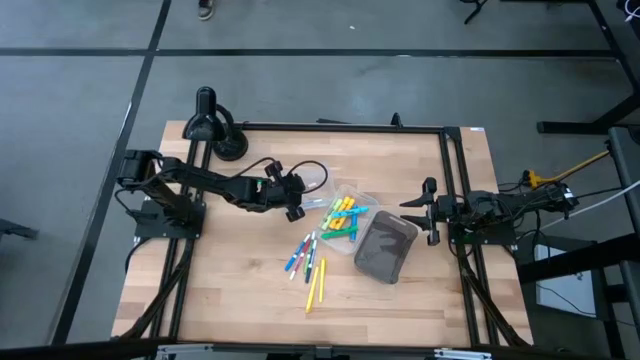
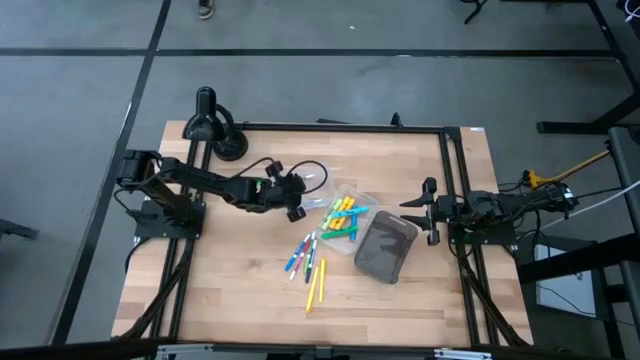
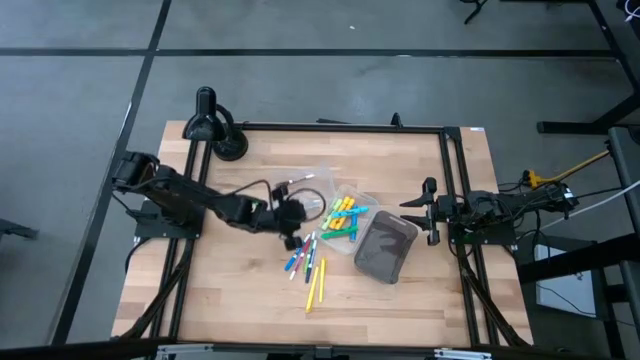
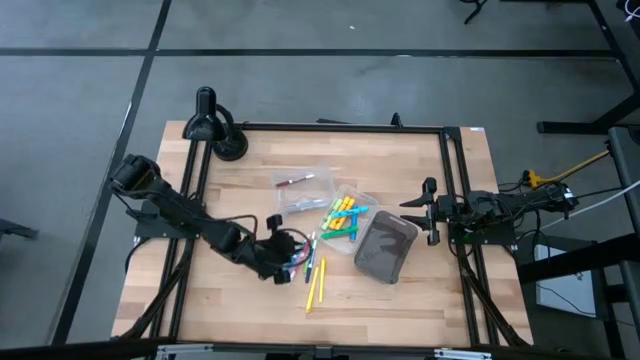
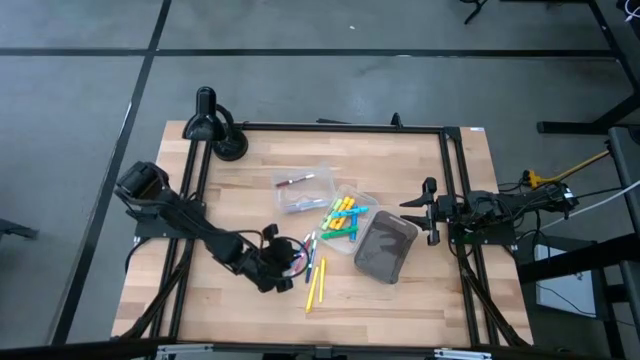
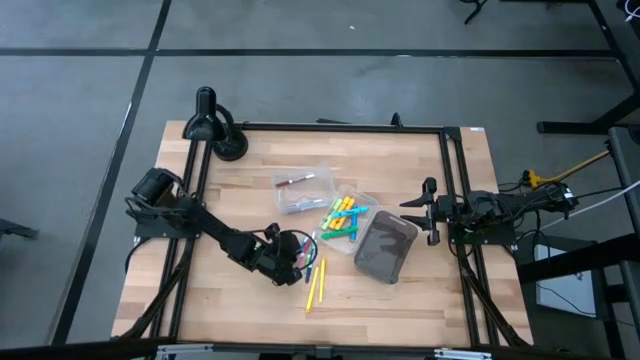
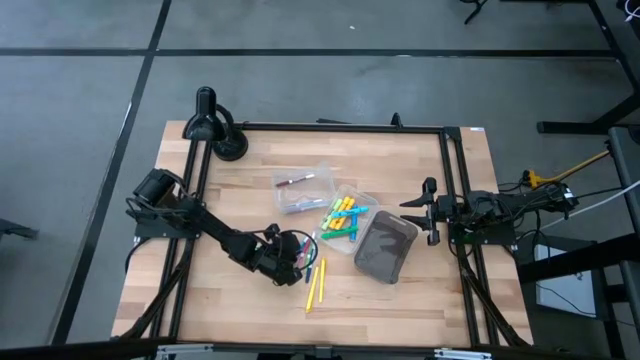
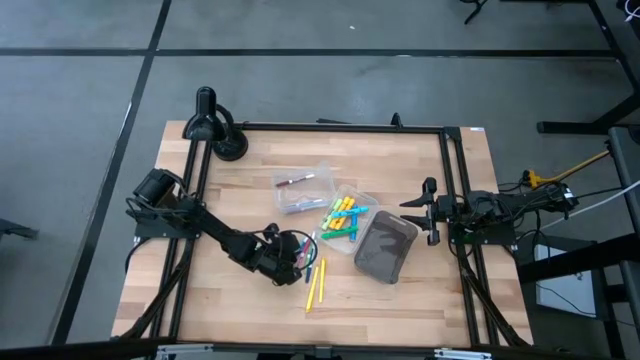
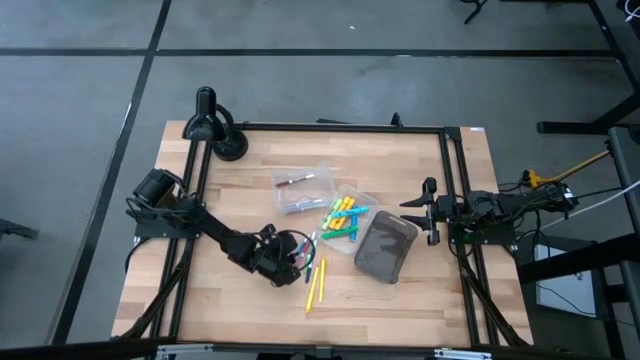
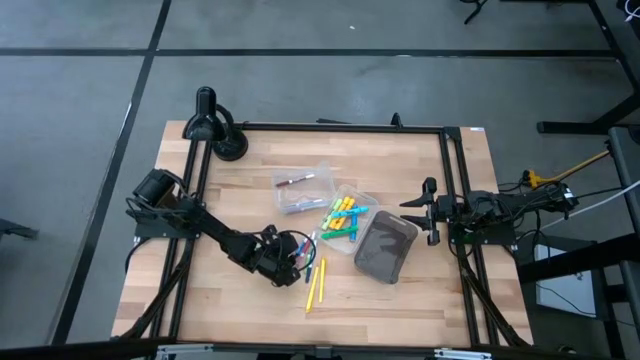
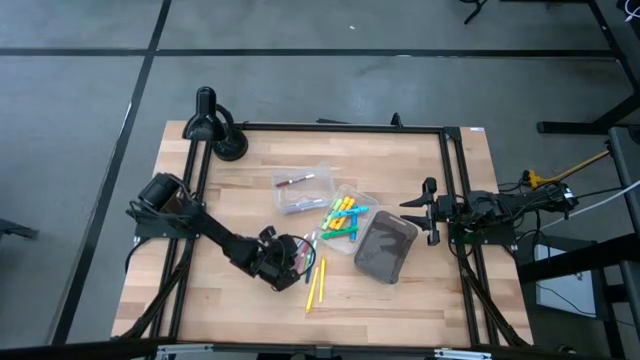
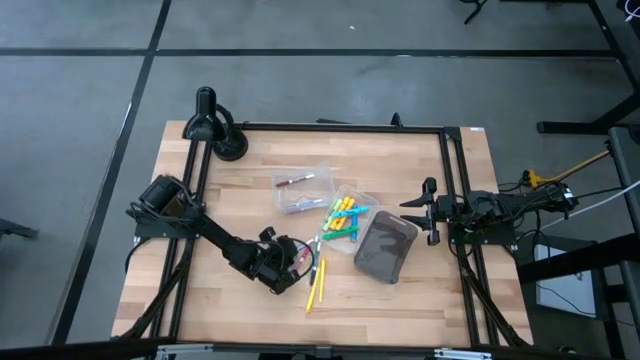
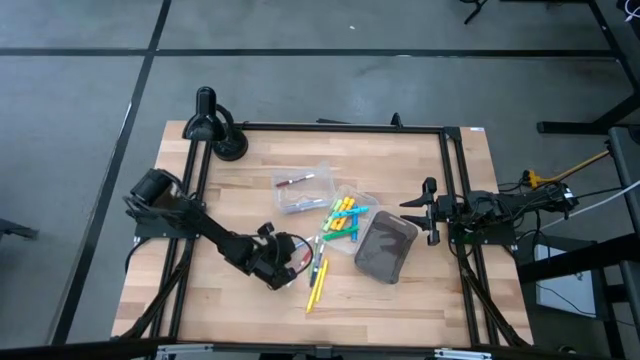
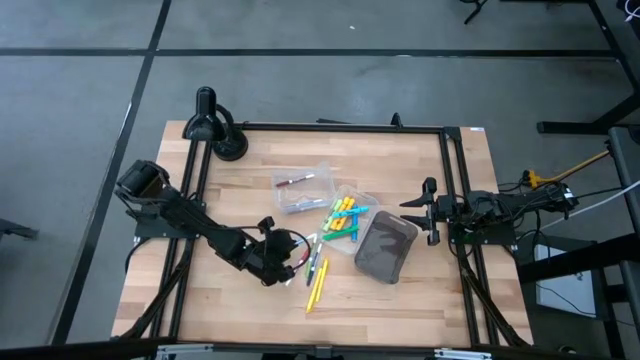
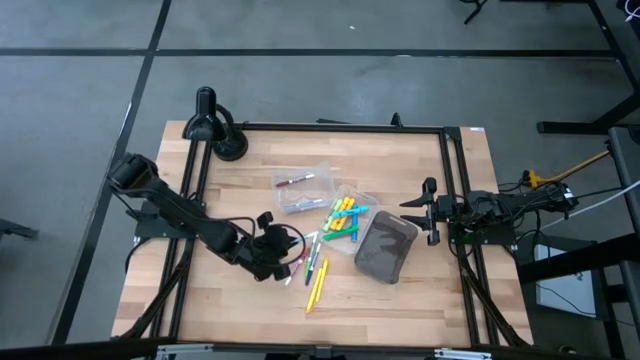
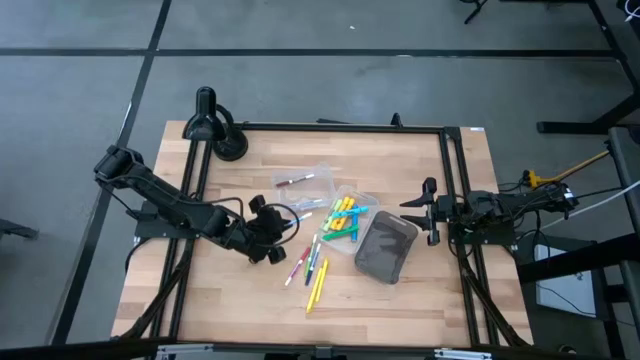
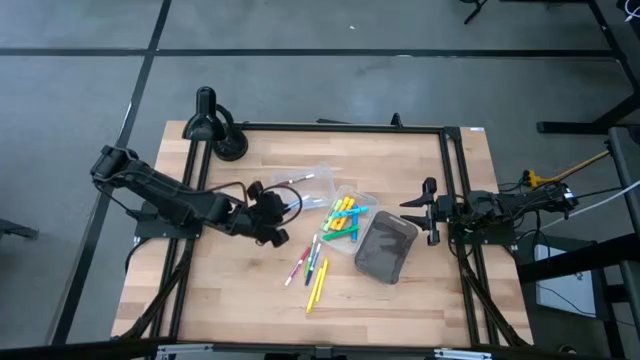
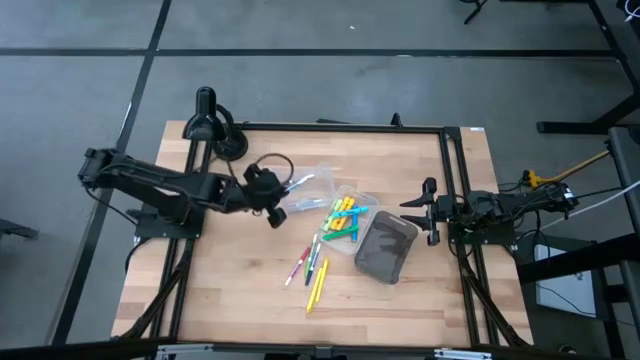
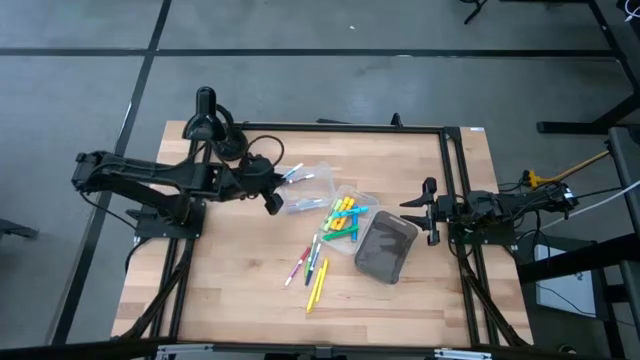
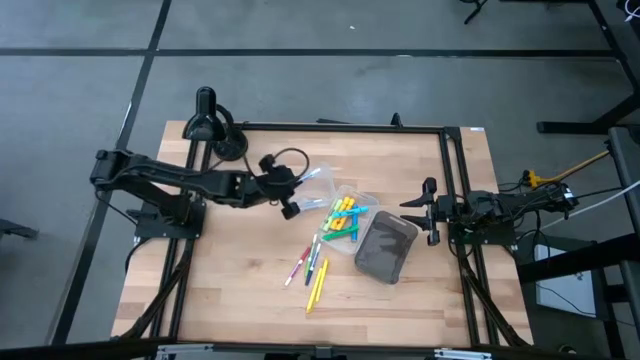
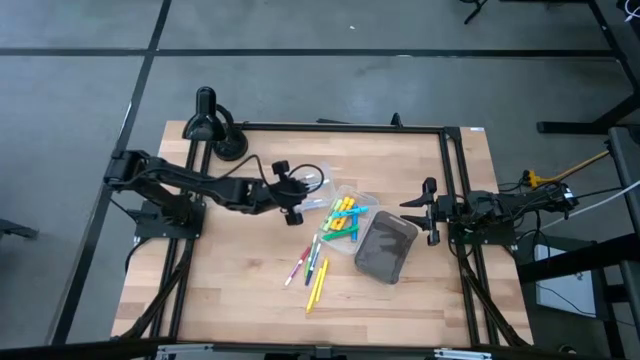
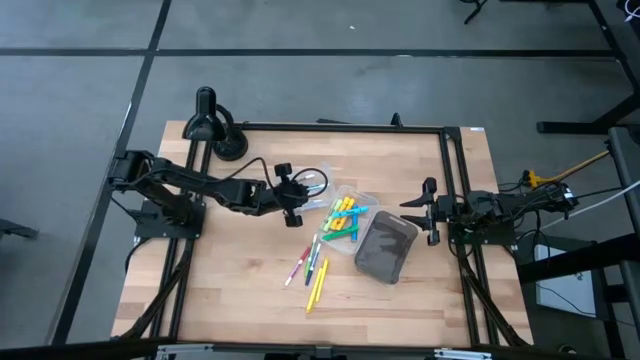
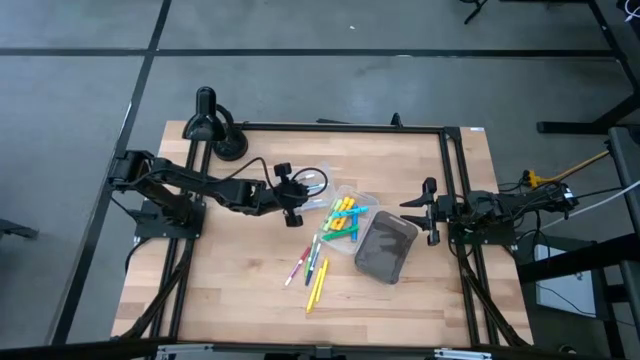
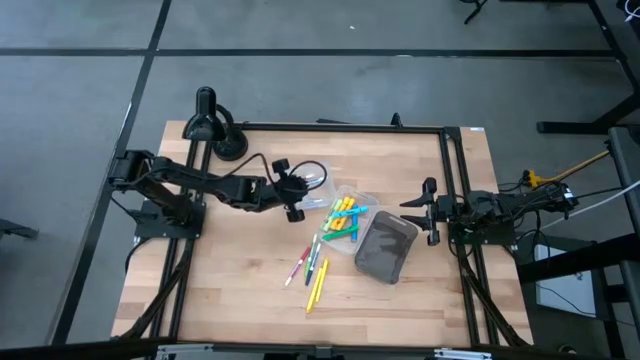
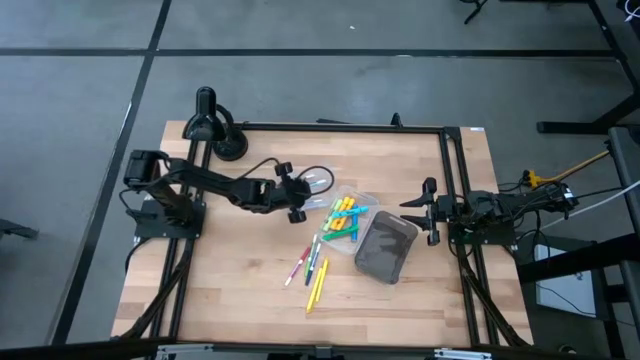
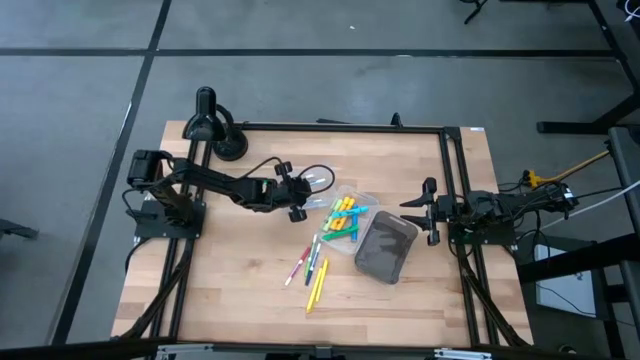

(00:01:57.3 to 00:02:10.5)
Task: Pick & Place Markers
Put the light blue marker pen into the left transparent bin

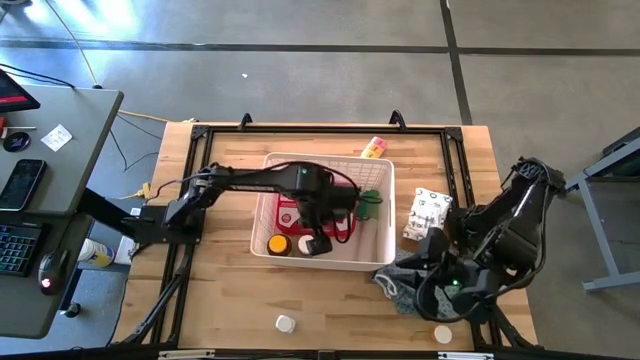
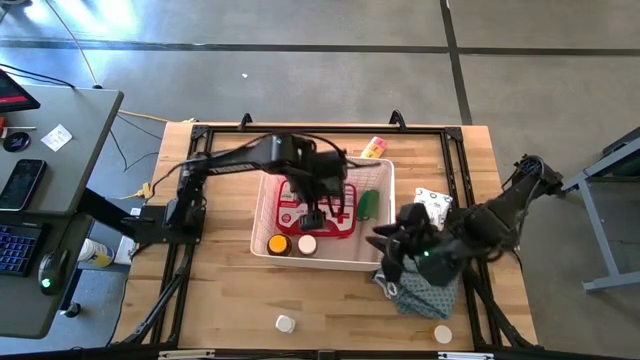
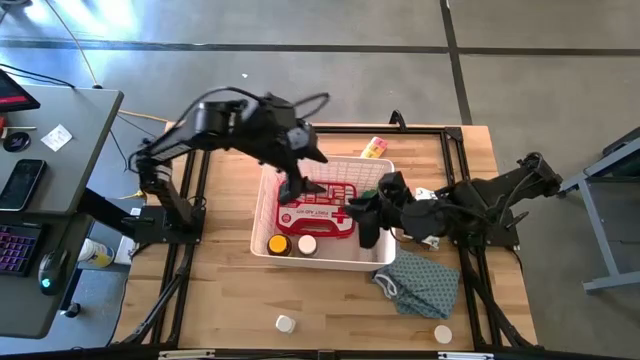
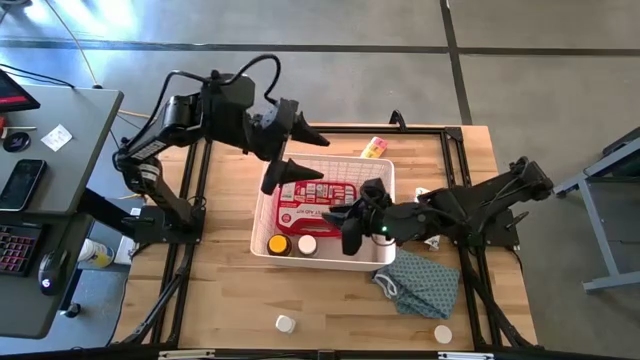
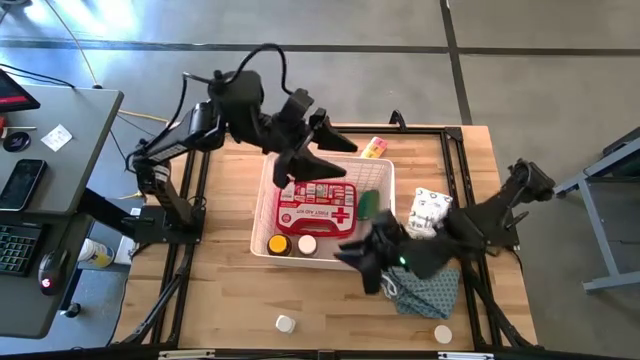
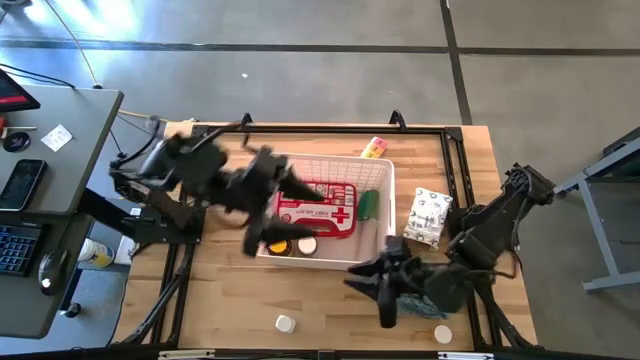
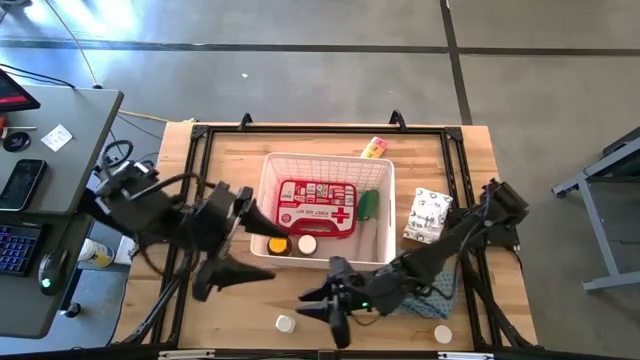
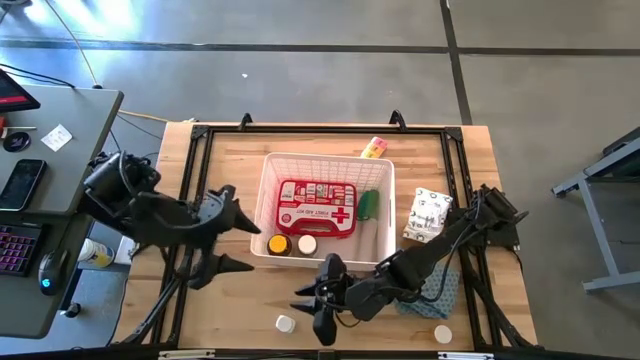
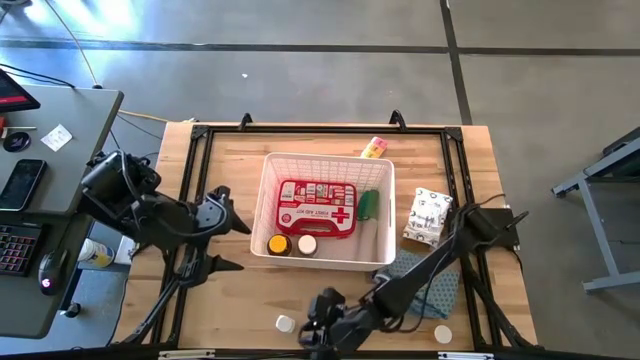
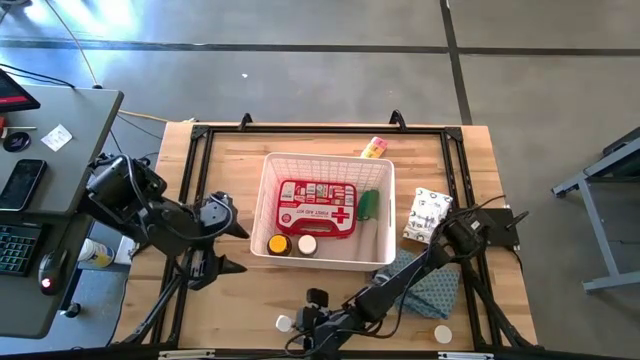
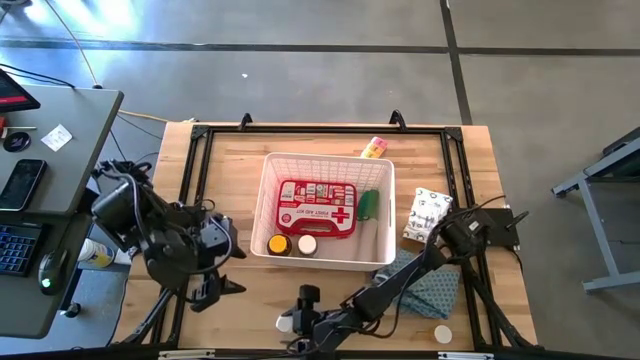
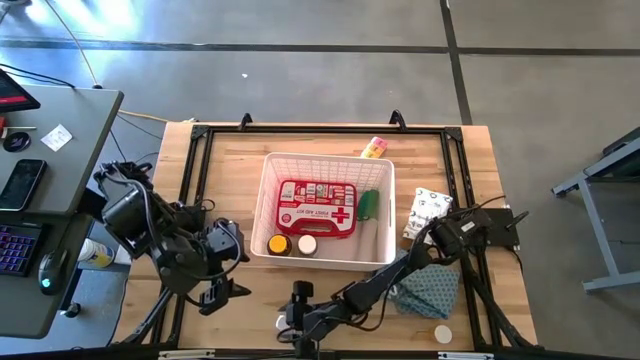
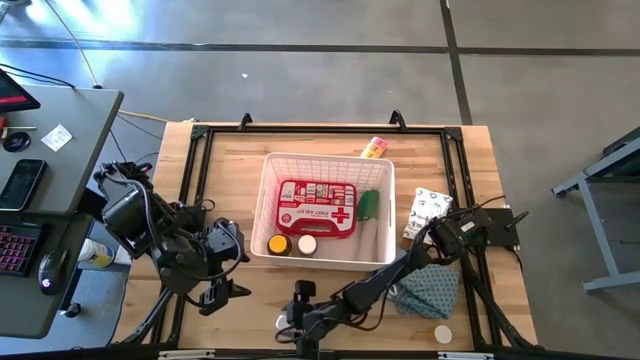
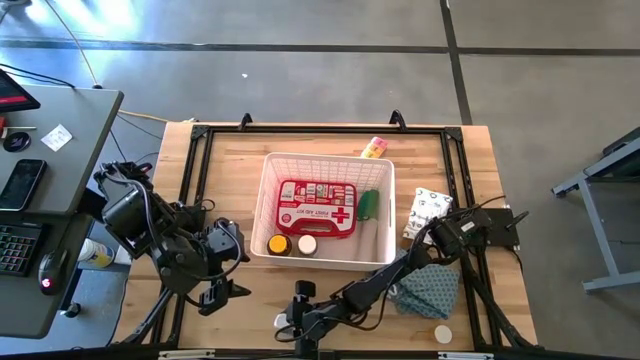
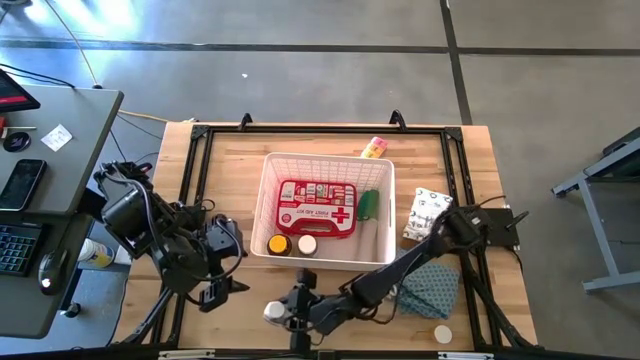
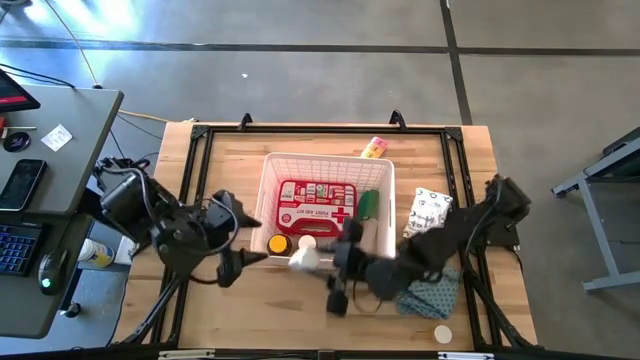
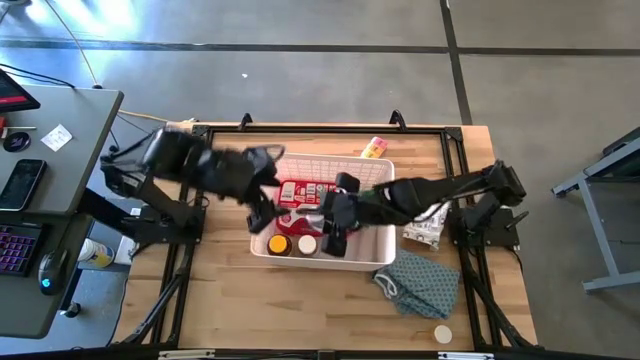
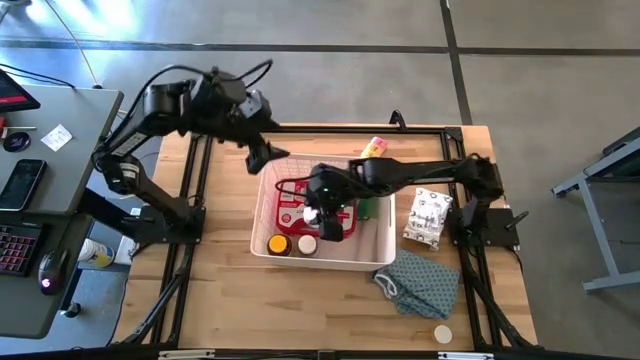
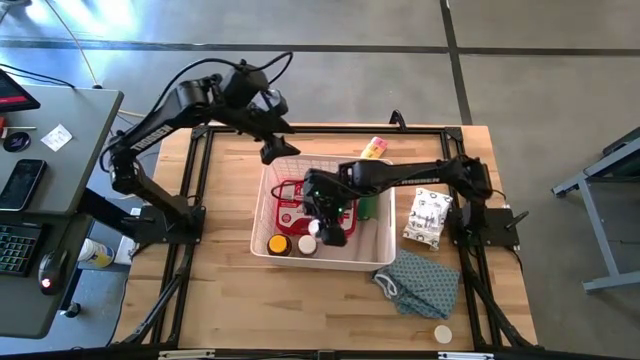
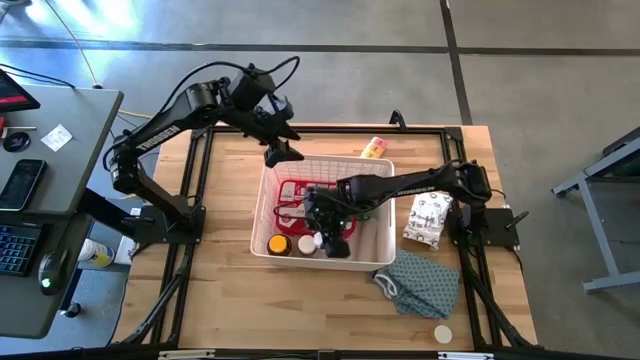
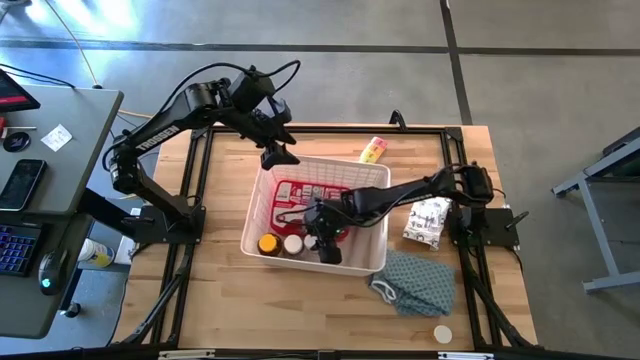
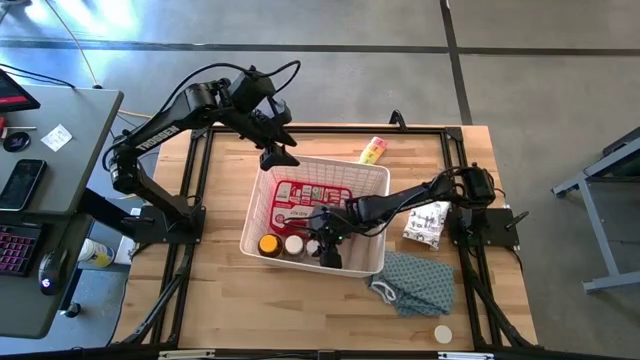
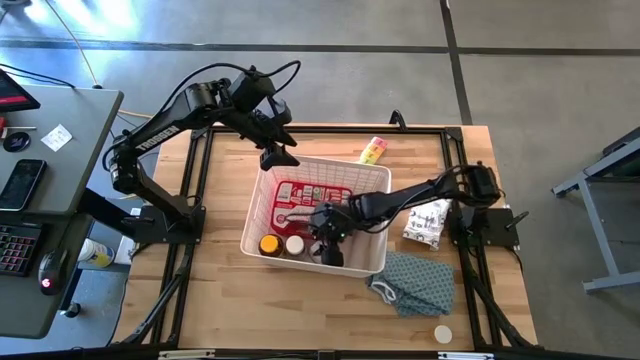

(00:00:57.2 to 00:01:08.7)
Task: Pick & place medical supplies in basket/bin
Put the white pill bottle into the white container
